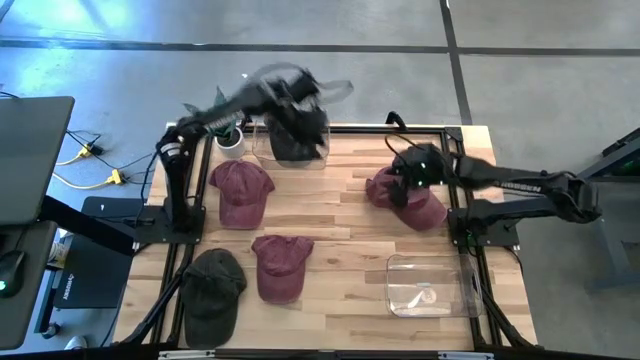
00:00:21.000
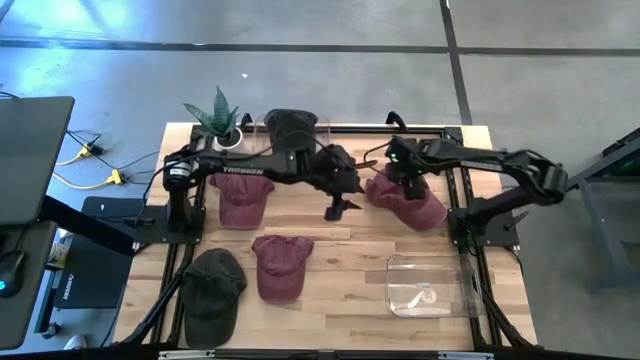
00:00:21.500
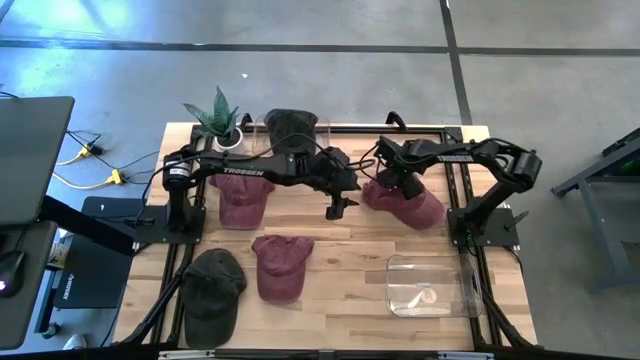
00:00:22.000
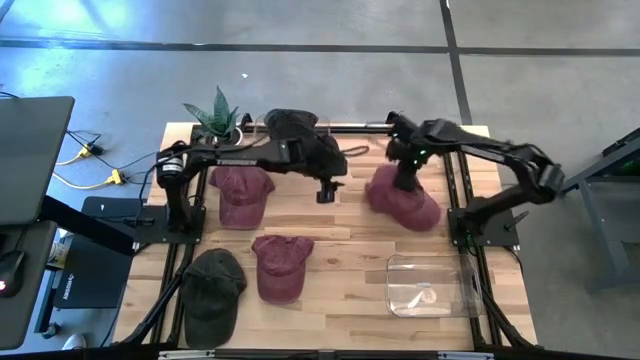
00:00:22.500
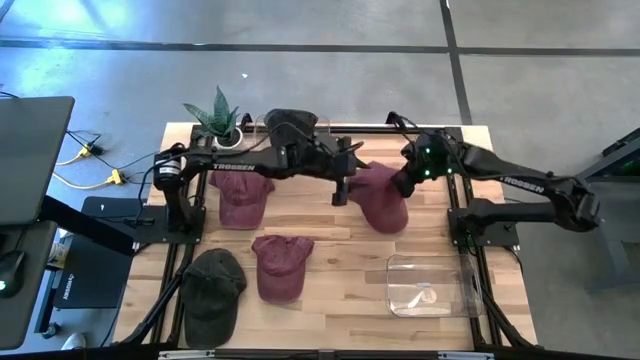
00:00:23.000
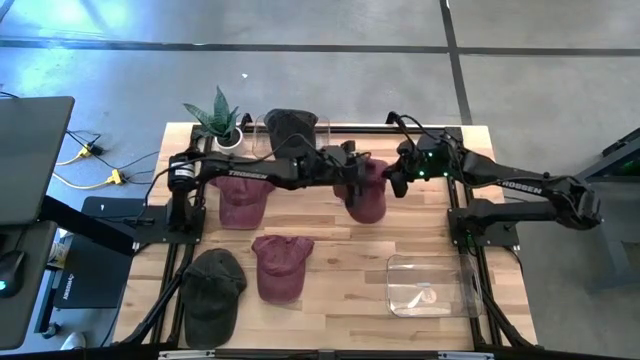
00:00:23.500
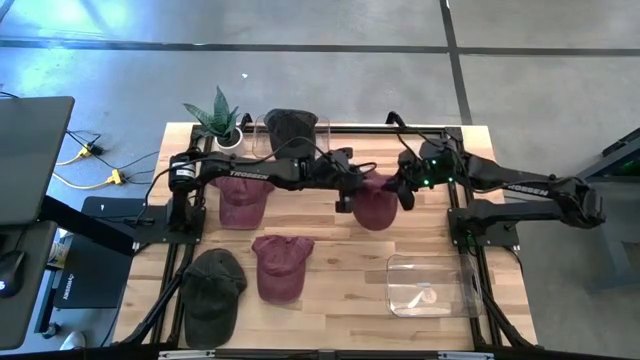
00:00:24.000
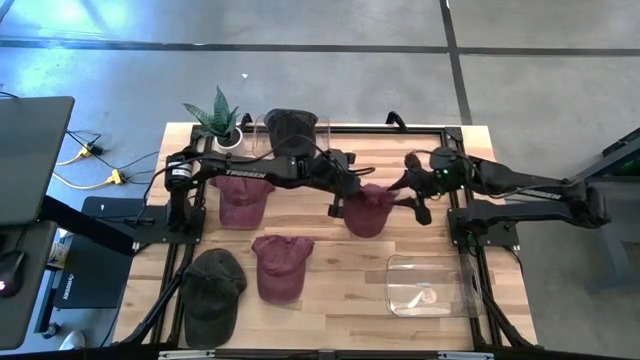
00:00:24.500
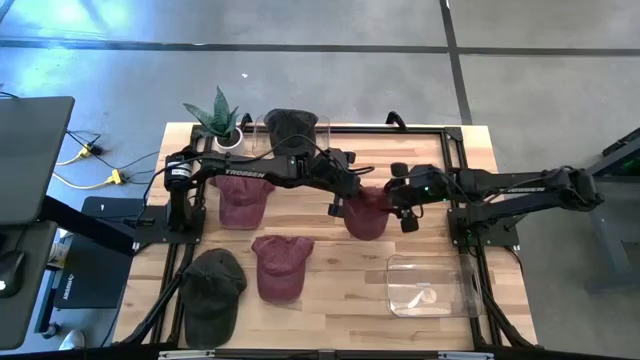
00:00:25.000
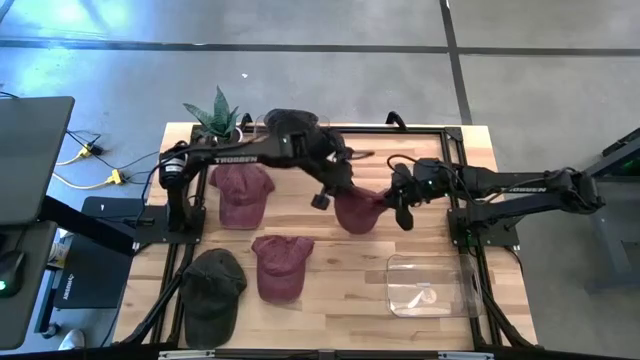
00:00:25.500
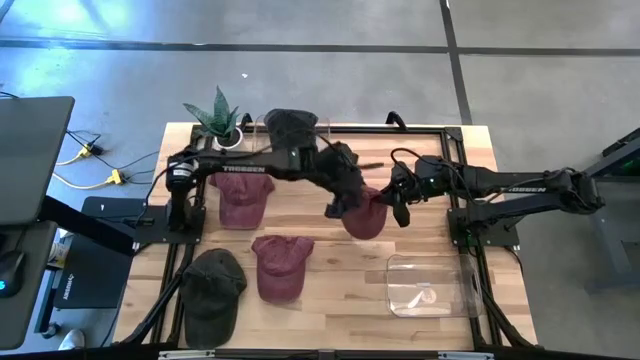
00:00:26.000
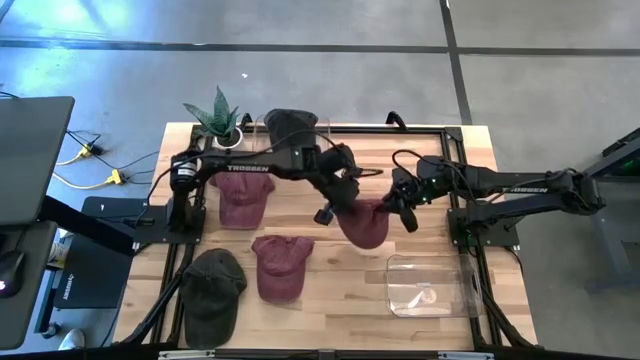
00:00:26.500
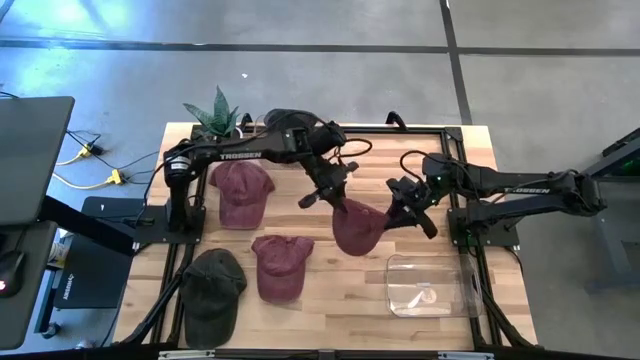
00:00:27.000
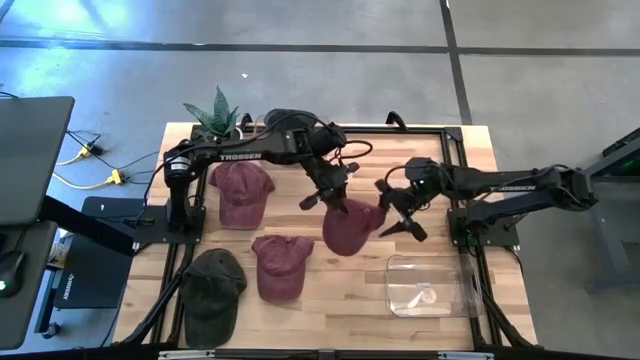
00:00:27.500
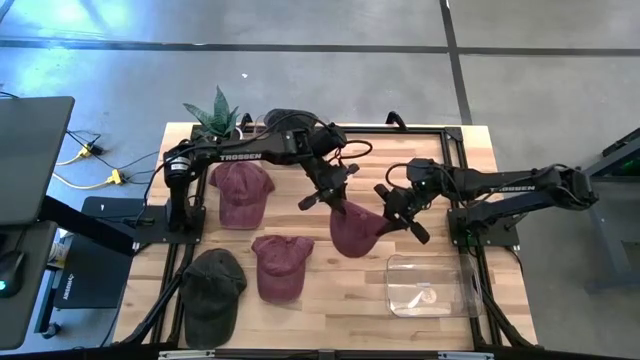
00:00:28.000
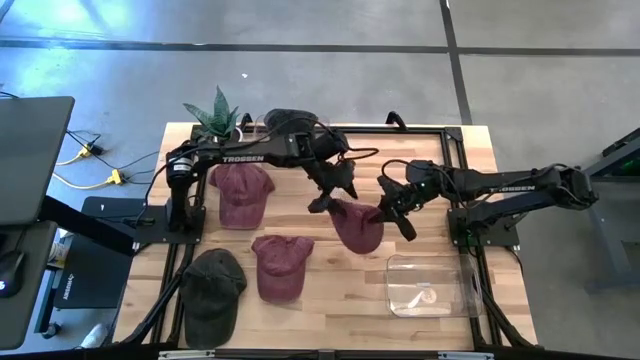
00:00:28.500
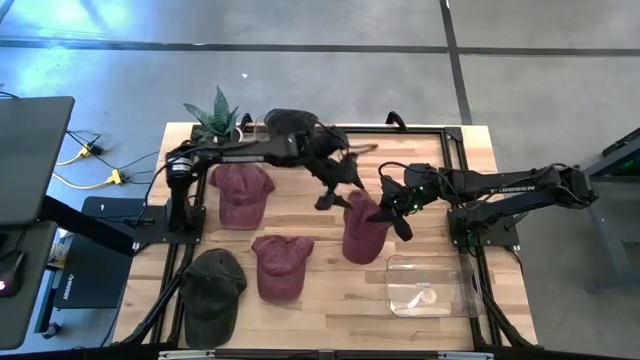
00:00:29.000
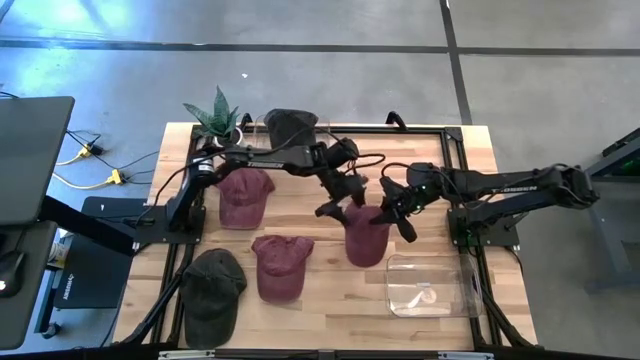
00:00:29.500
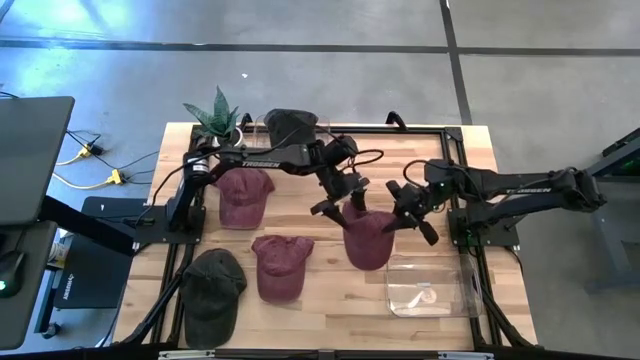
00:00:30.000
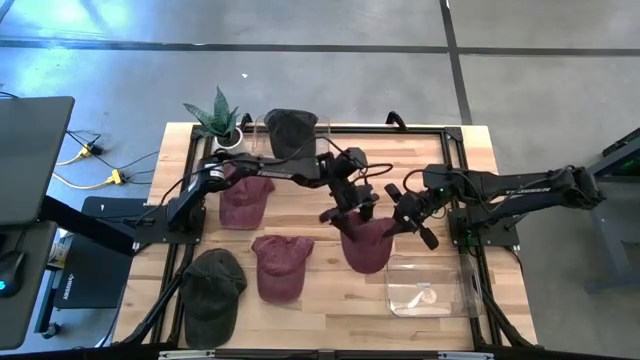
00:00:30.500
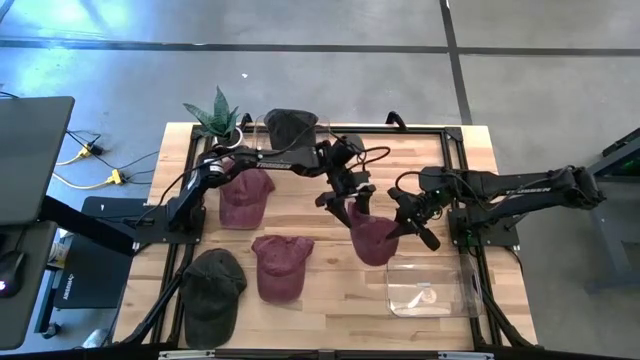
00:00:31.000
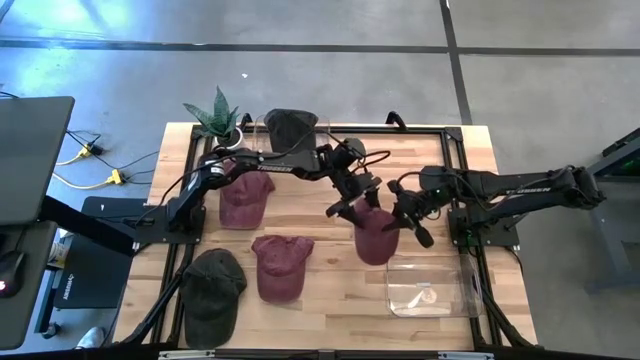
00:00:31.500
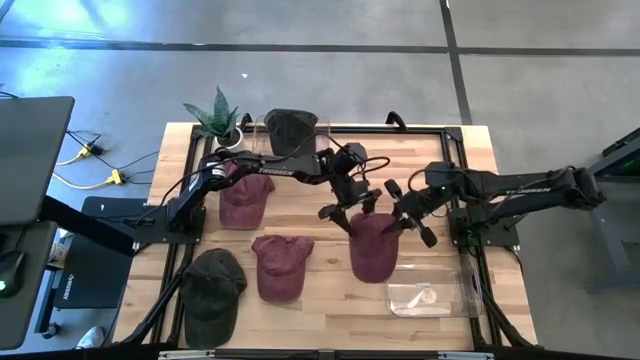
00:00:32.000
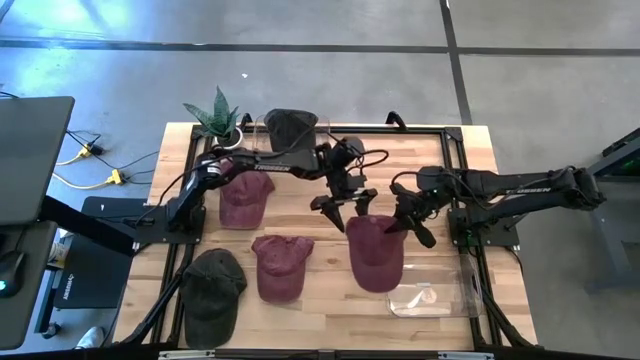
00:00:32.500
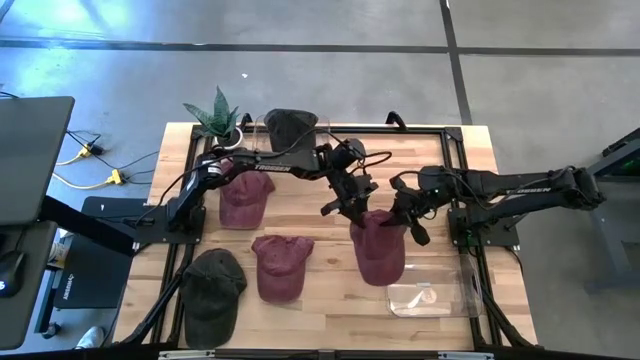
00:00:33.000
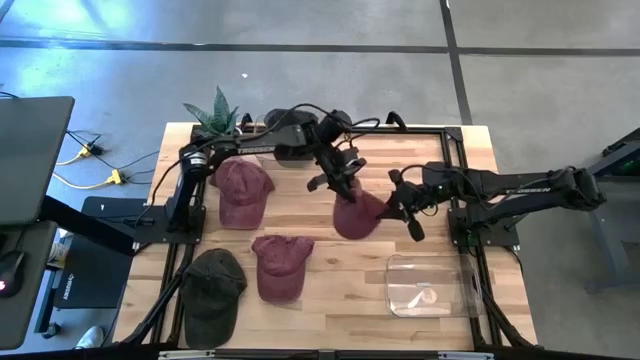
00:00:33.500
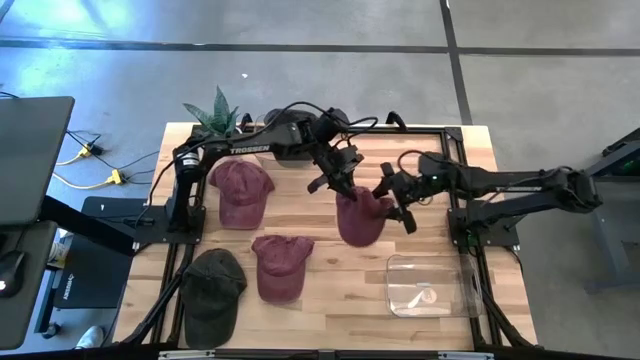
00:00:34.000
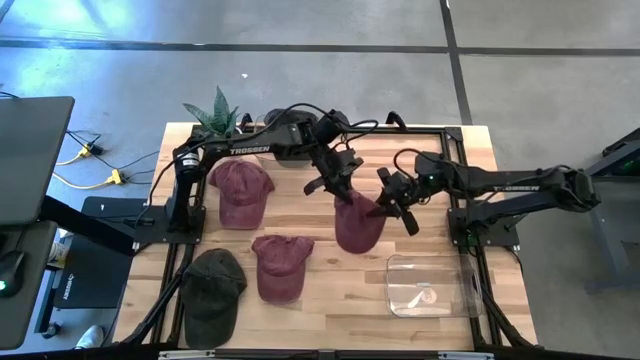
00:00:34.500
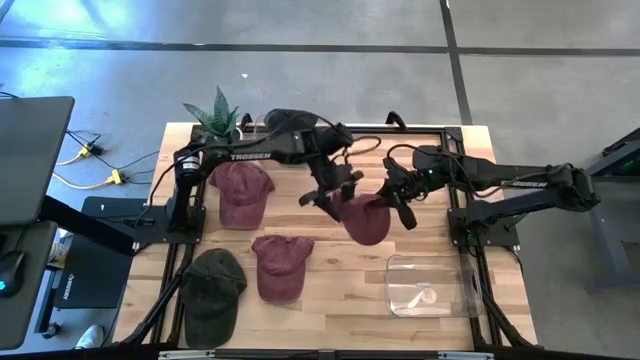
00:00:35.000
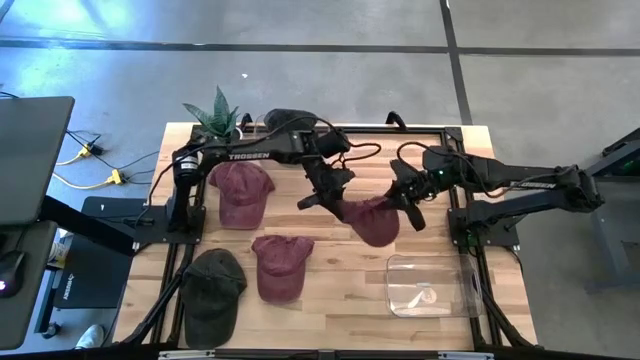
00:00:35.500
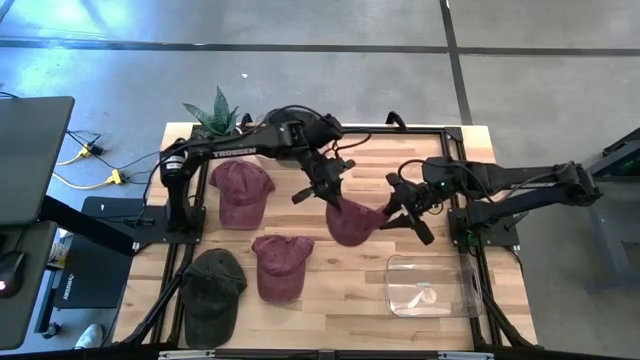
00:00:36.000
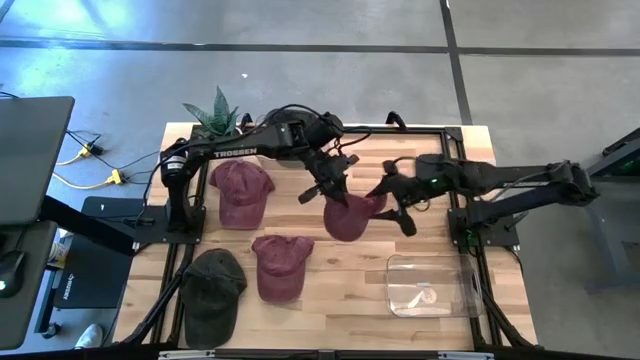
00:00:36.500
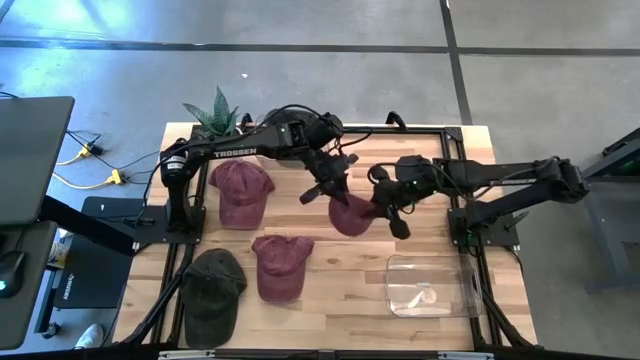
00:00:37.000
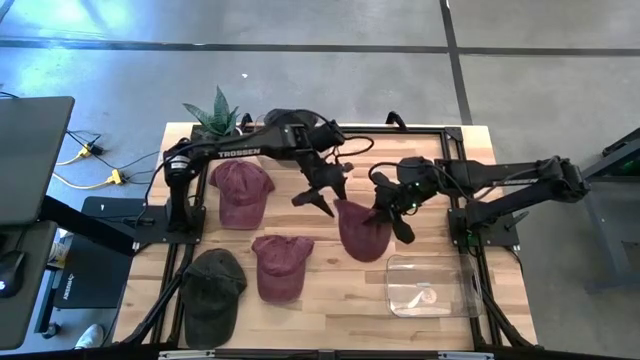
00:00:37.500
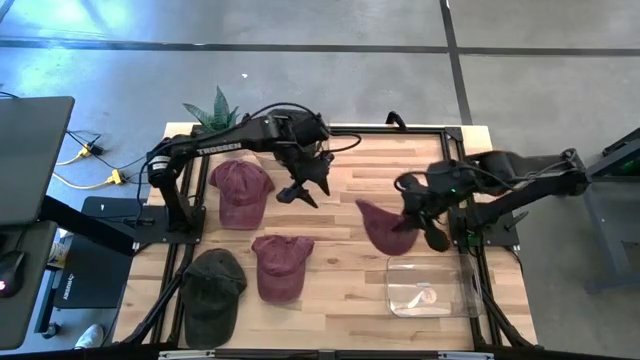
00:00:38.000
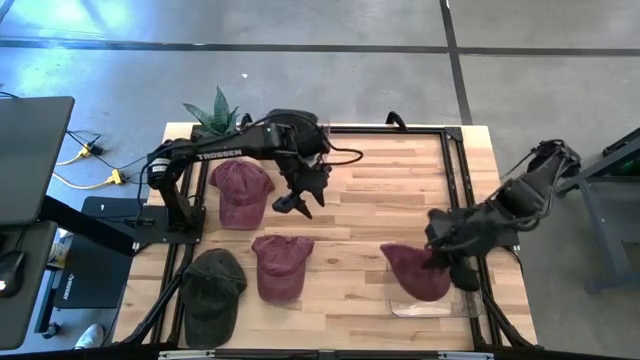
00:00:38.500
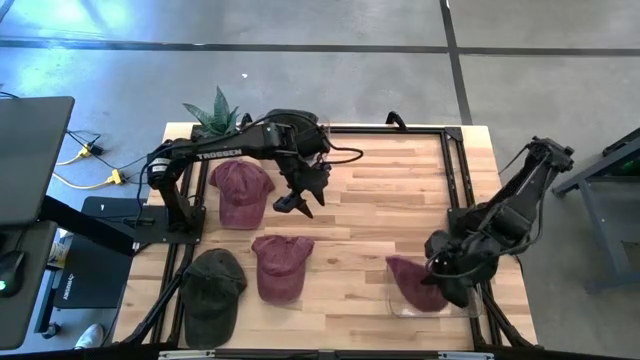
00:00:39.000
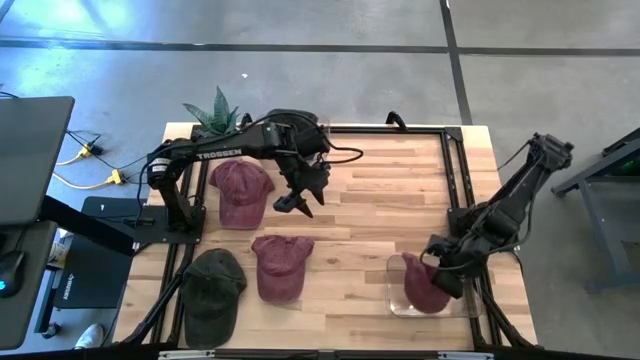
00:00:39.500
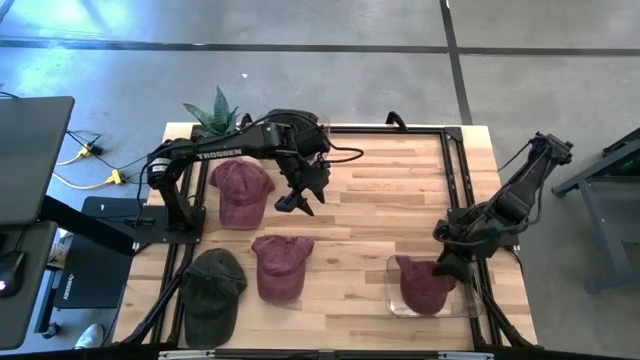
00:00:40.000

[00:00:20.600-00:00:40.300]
Task: Pick & Place hat
Put the top right red cap into the bottom transparent bin

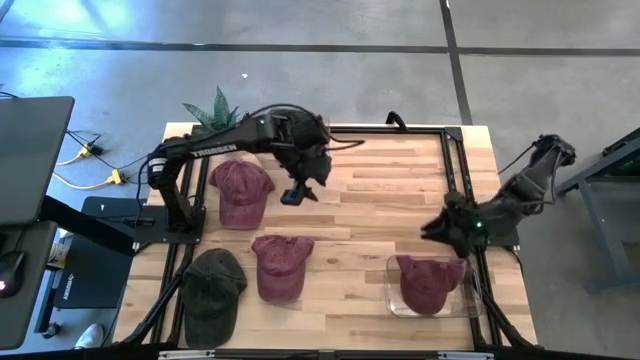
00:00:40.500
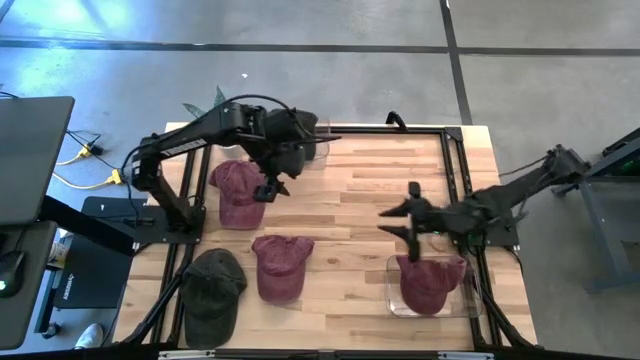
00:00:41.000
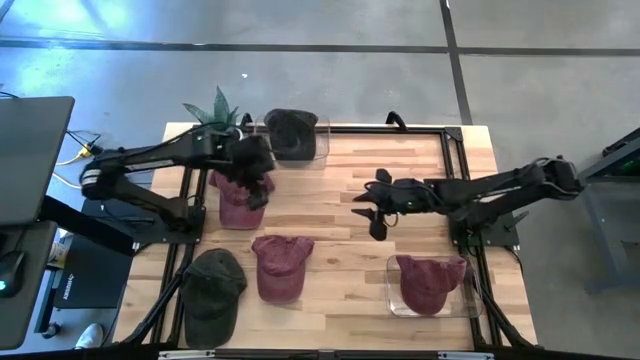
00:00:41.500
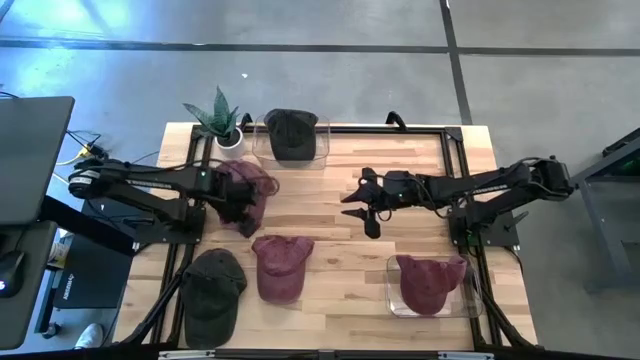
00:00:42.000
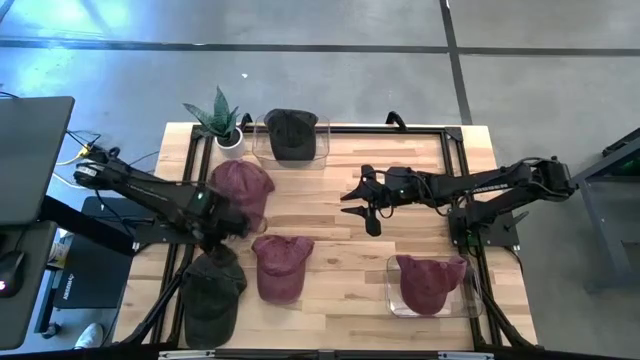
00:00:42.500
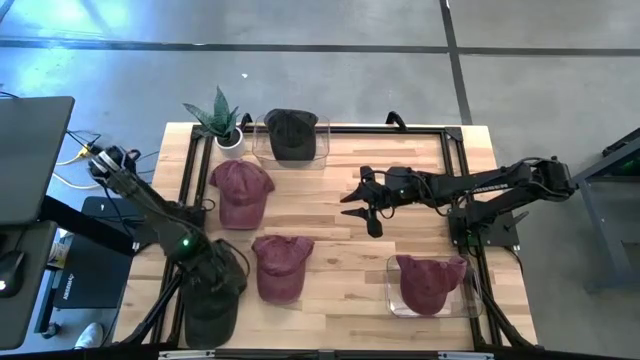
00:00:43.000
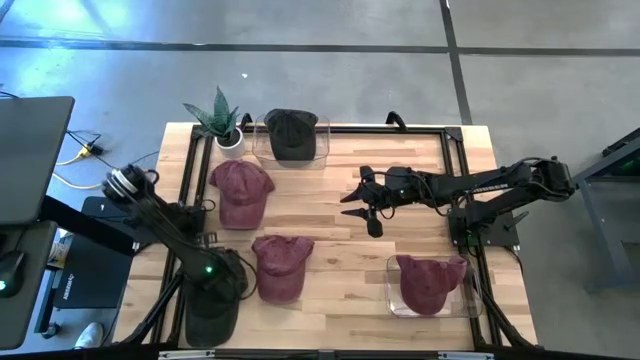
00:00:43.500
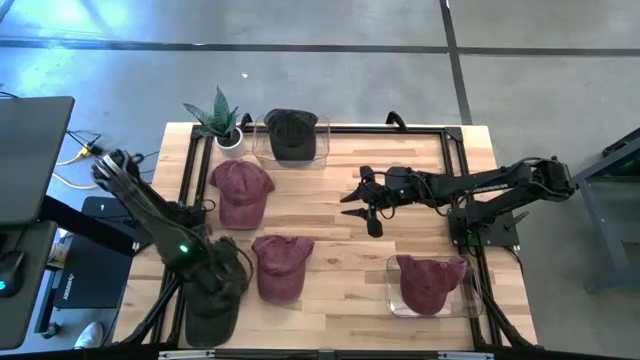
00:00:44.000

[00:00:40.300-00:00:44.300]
Put the black cap into the top transparent bin
